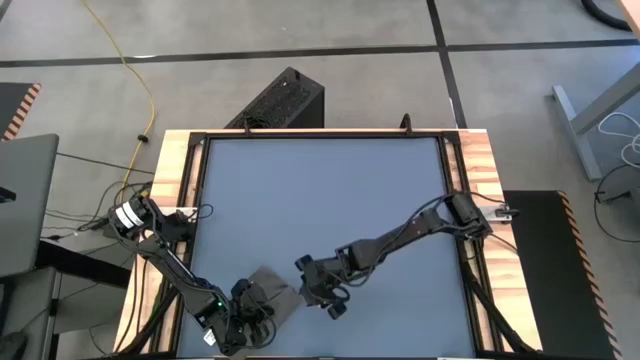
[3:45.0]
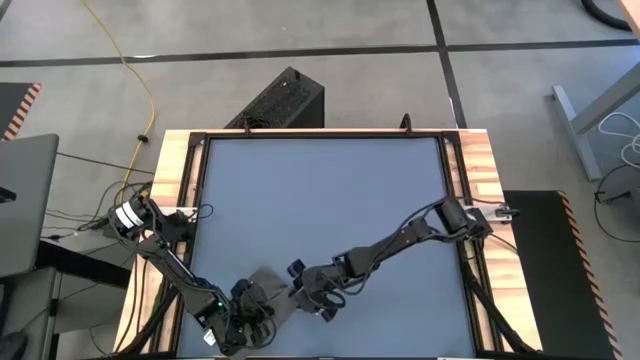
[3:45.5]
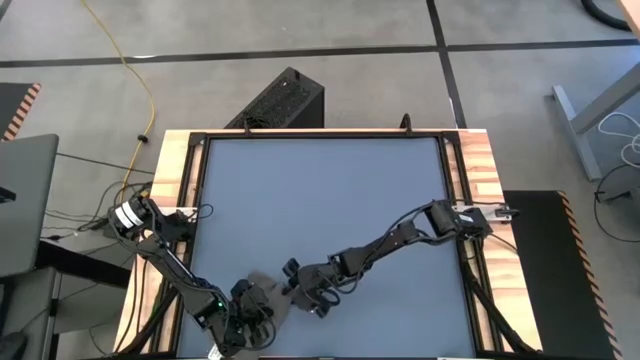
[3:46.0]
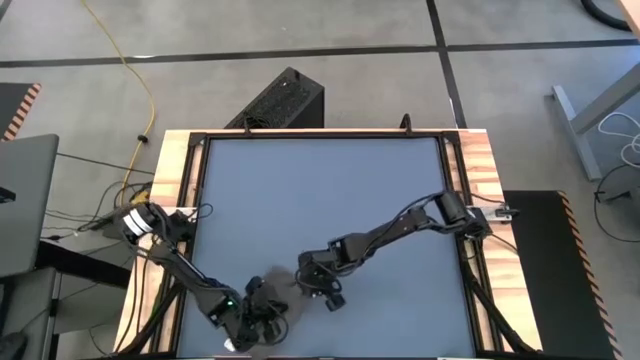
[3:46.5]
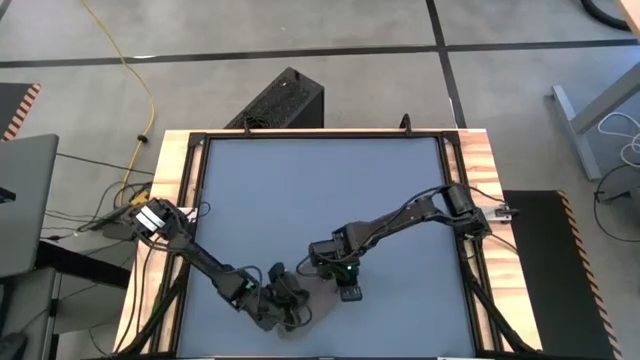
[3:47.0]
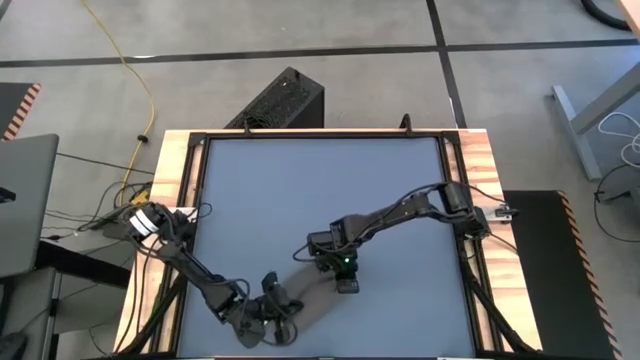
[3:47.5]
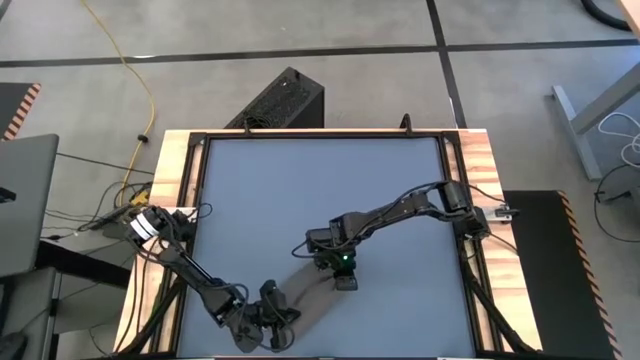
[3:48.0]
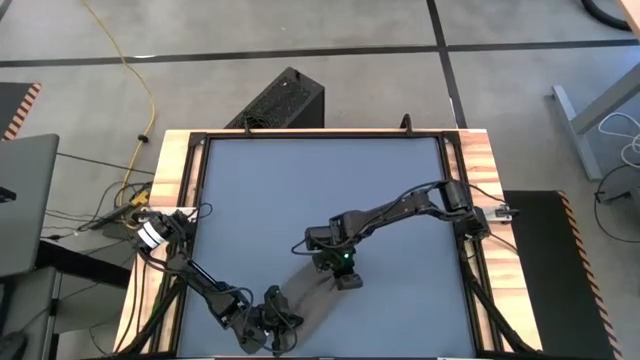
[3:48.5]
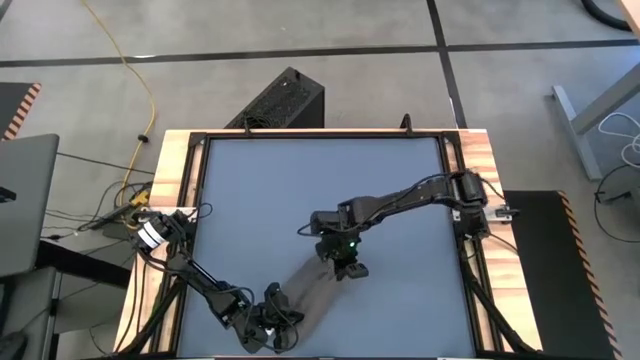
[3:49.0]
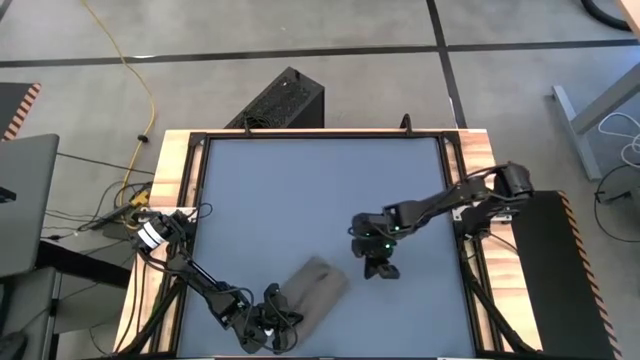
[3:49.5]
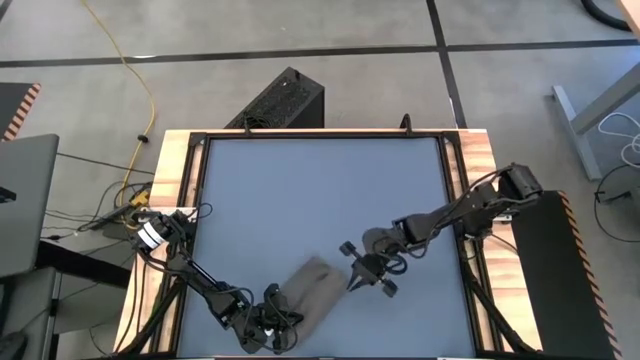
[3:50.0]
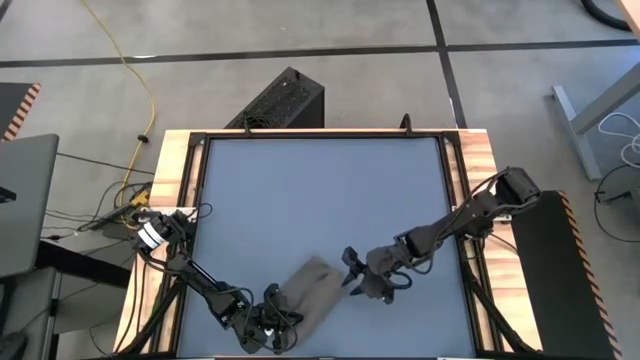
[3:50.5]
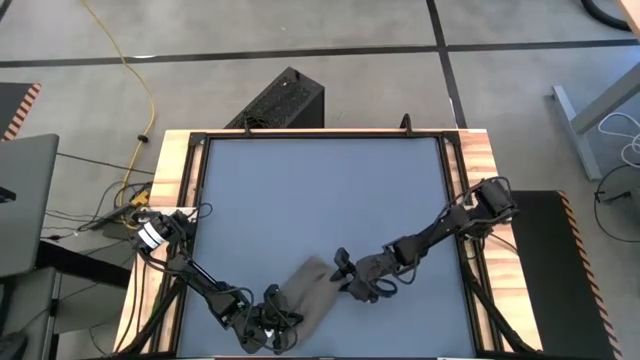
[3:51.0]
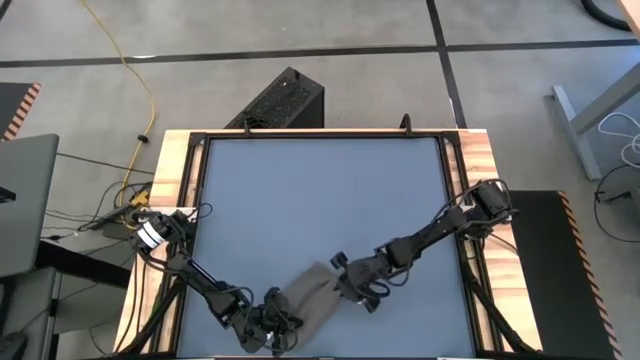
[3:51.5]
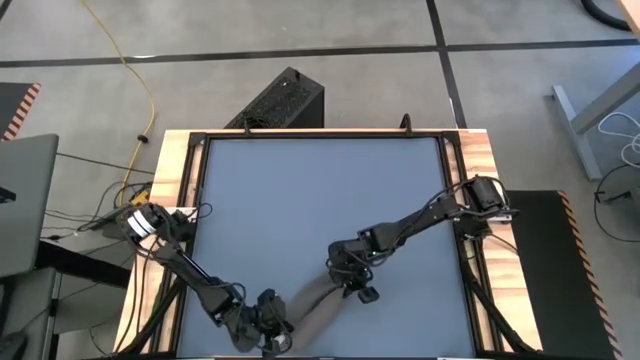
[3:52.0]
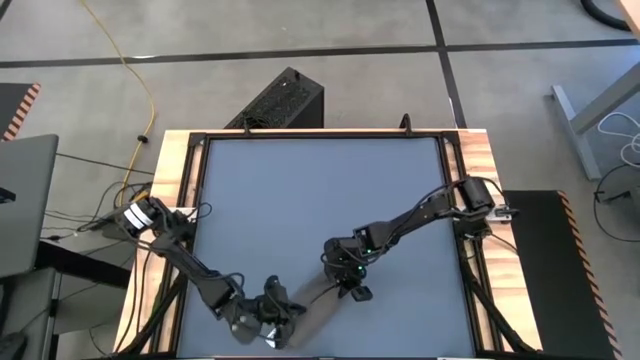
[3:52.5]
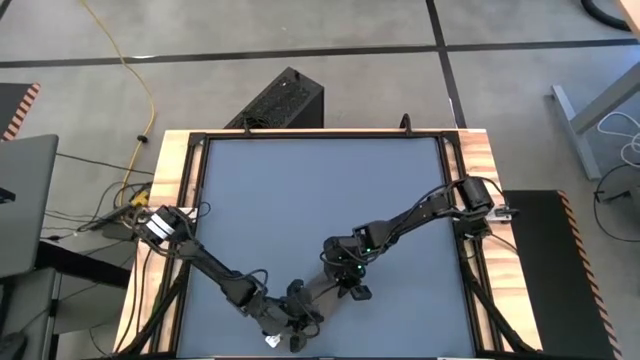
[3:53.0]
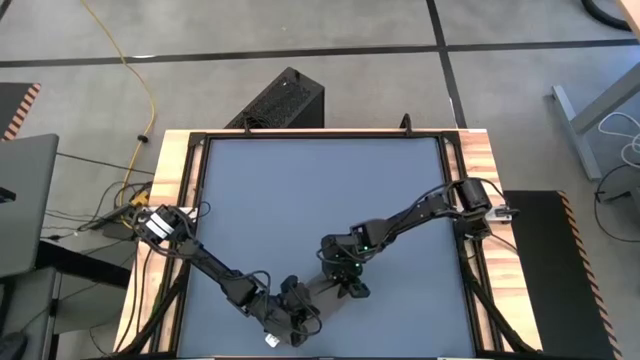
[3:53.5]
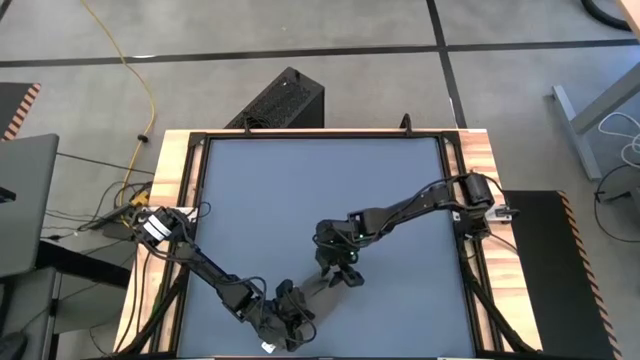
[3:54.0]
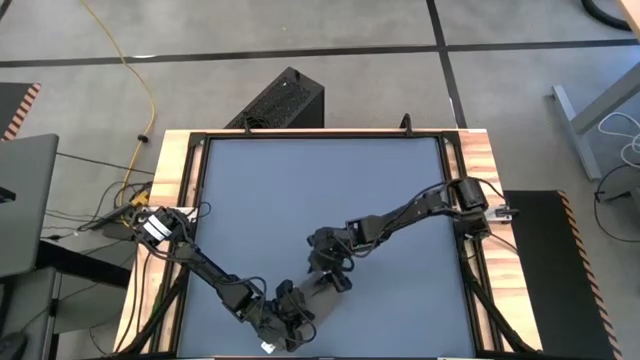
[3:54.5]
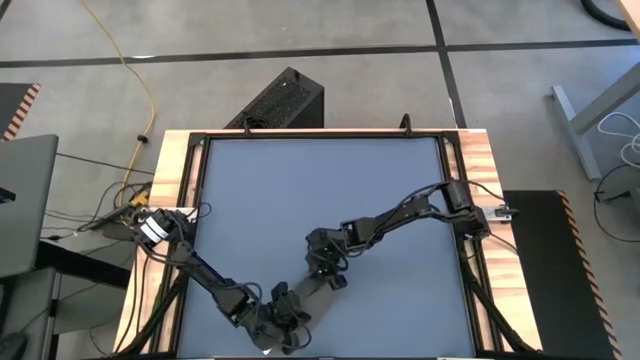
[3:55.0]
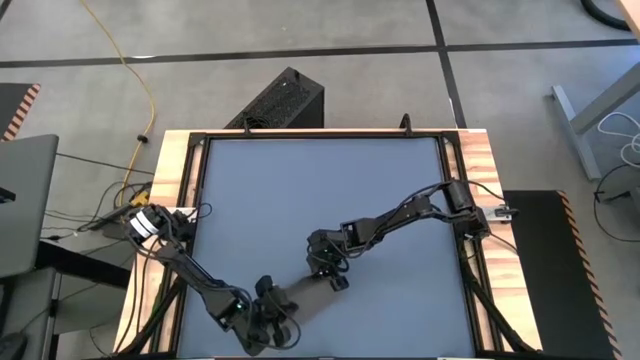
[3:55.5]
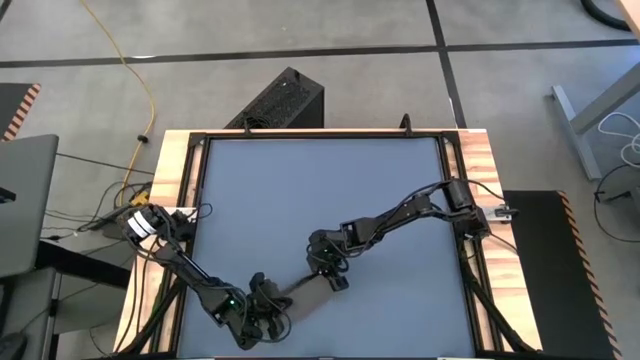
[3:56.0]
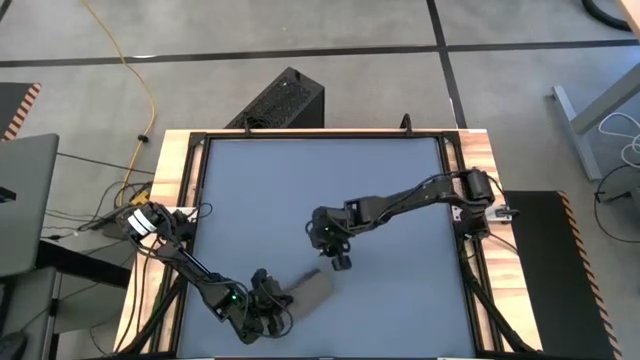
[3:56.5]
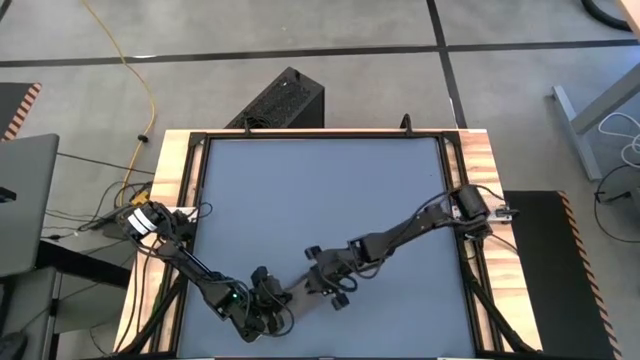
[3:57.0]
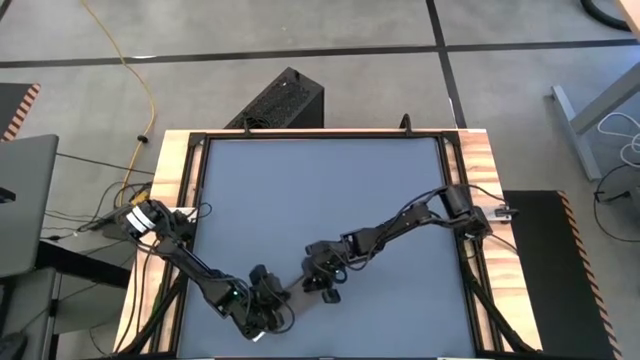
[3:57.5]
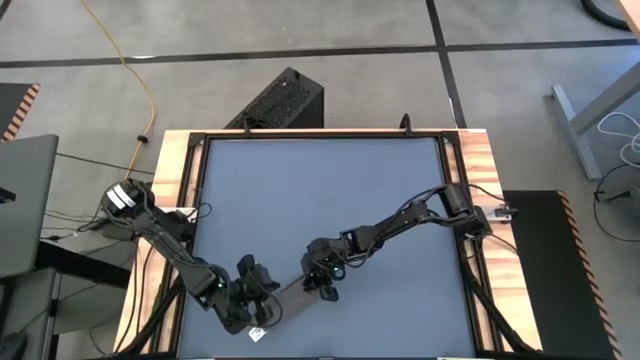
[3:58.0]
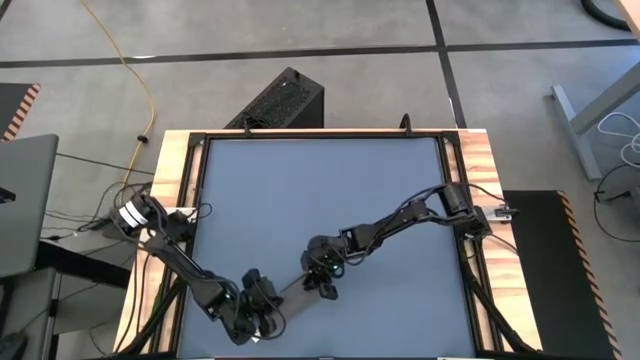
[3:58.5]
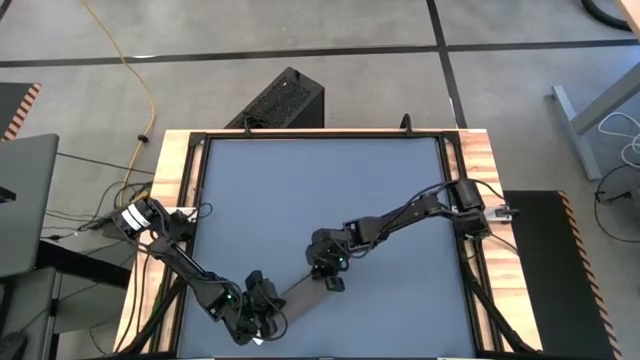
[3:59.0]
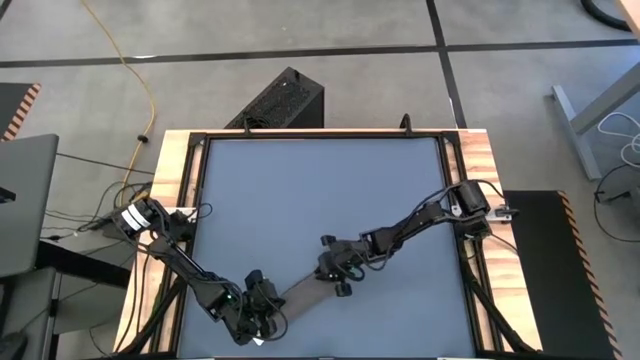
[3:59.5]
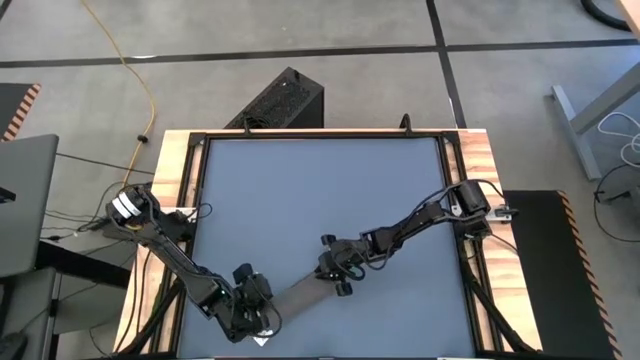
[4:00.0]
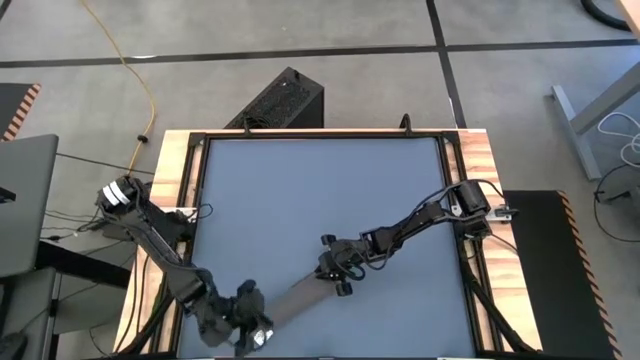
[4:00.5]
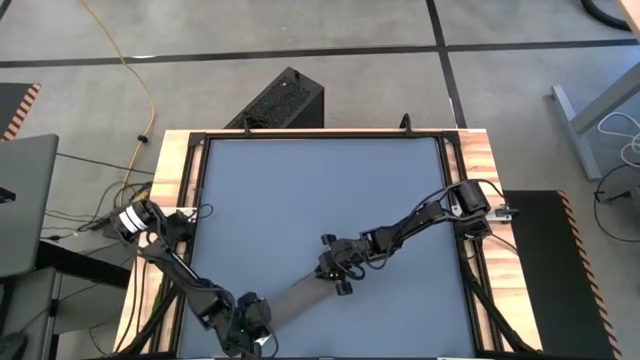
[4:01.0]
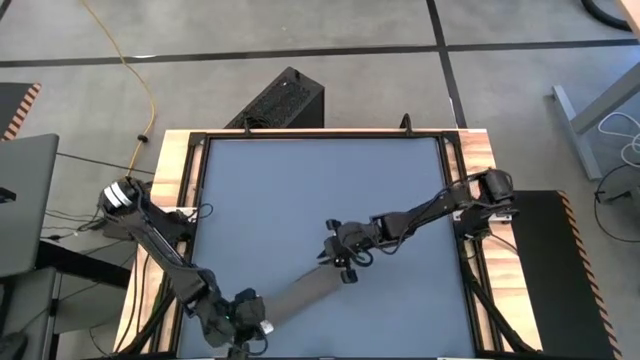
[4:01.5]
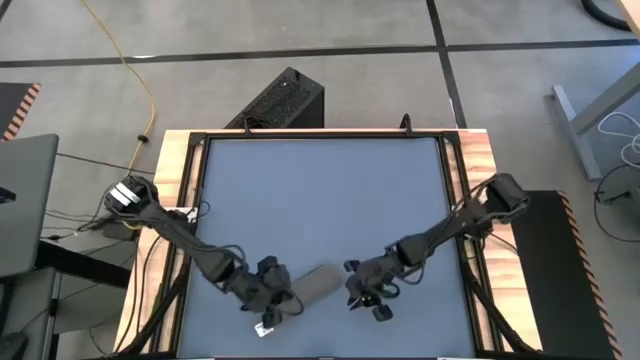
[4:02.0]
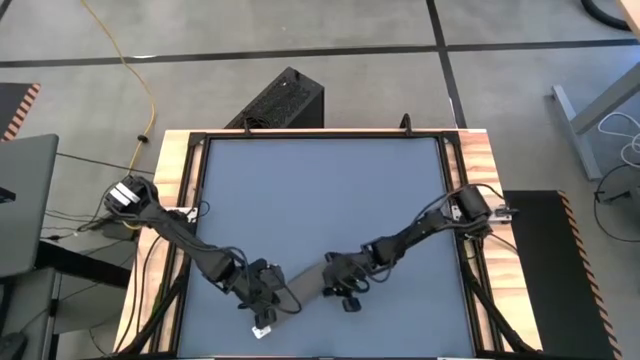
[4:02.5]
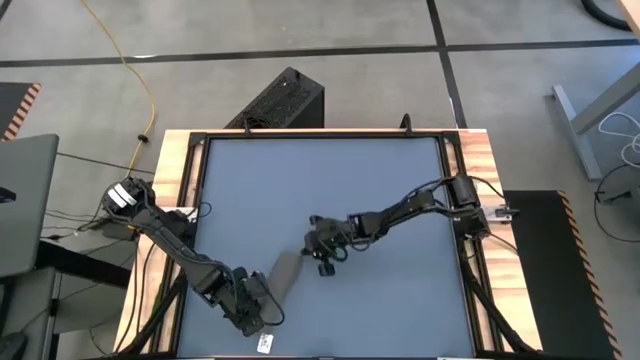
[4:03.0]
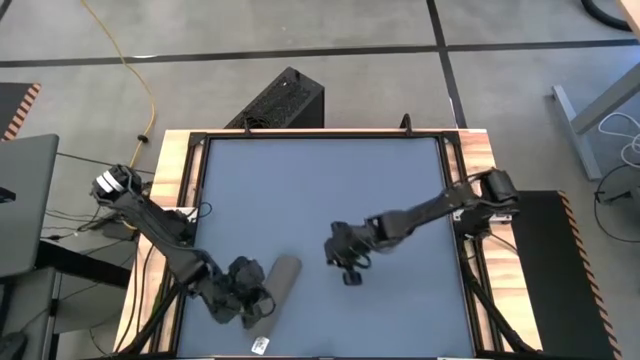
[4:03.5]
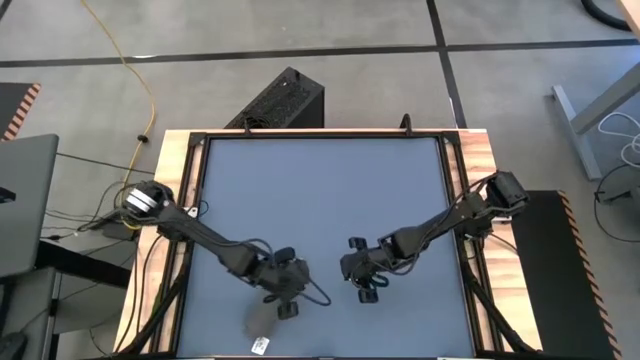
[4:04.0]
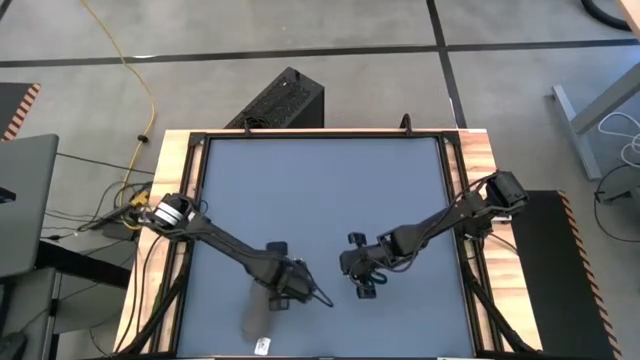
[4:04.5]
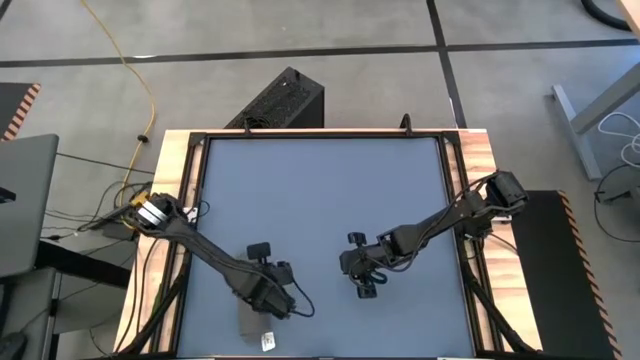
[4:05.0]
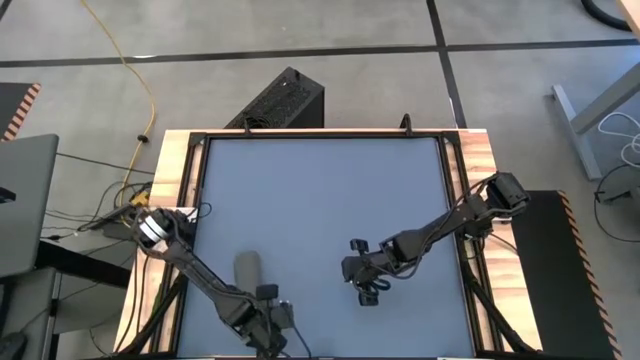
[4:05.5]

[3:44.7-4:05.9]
Task: Roll towel into tight, uniform cylinder
Roll the gray towel

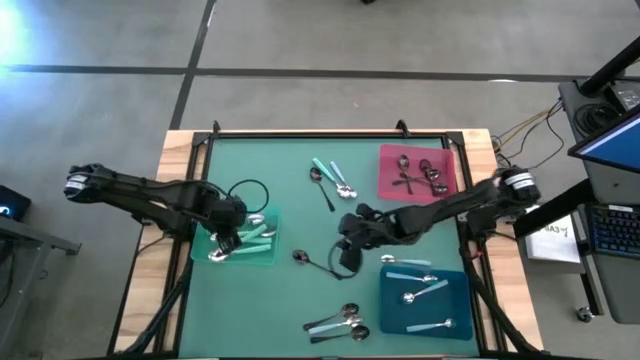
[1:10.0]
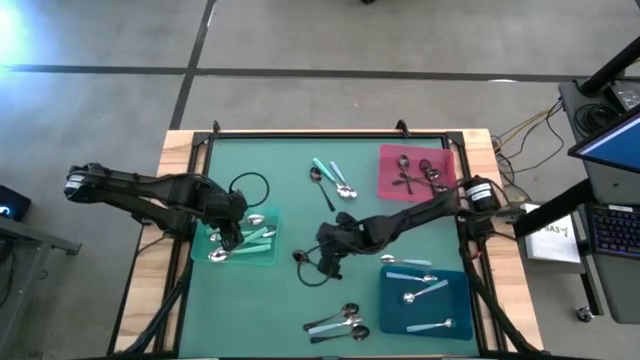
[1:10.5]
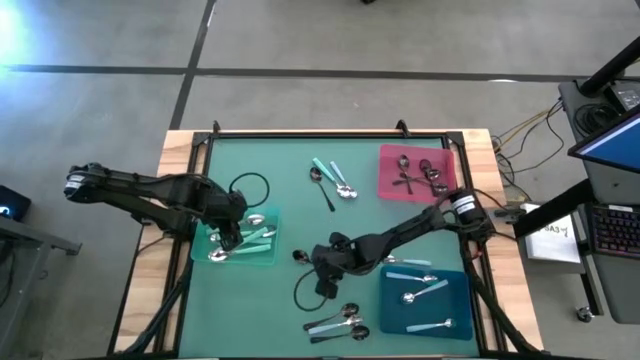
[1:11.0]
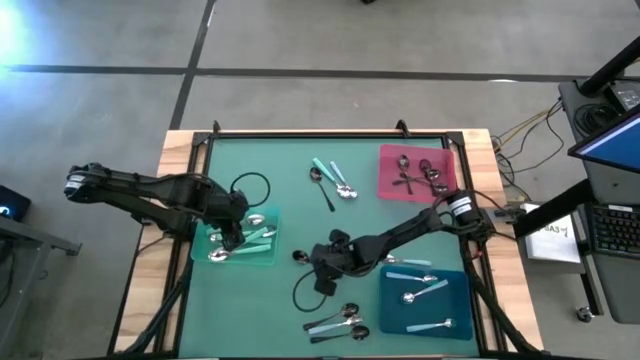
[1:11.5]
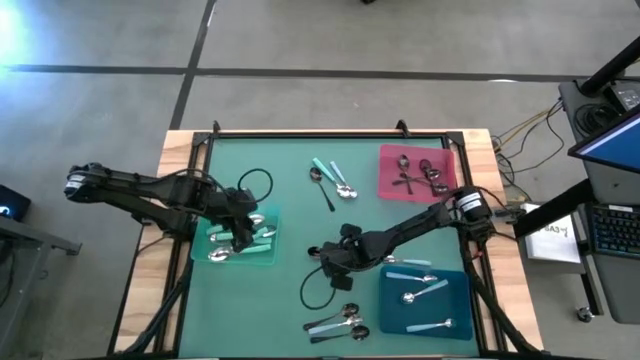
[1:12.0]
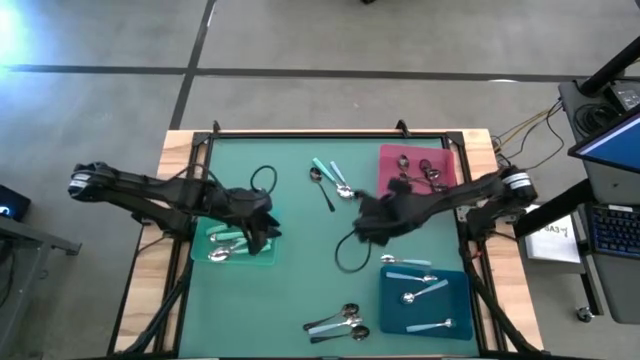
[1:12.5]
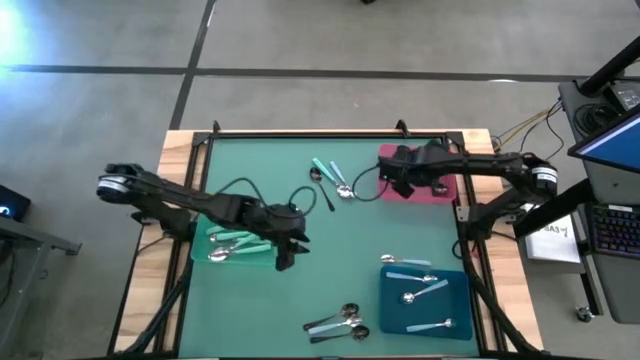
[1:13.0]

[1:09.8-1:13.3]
Task: Sort silverware by color (type)
Put the black spoon into the red bin
